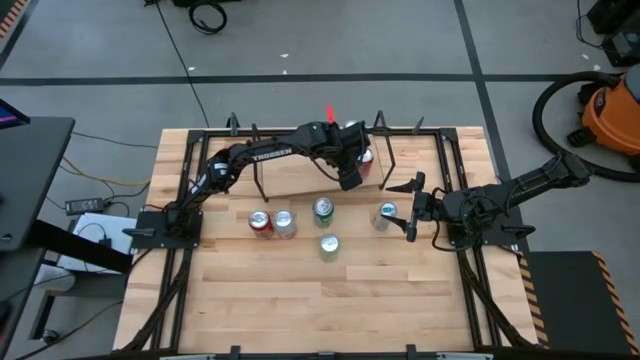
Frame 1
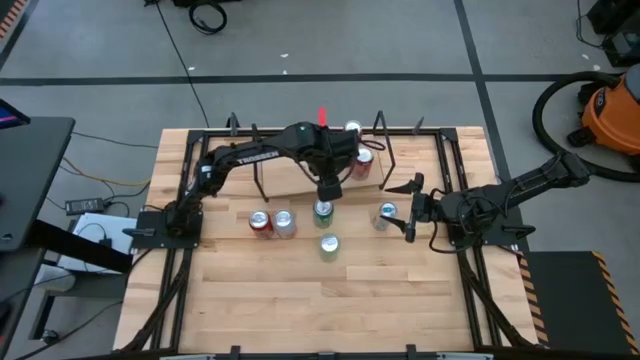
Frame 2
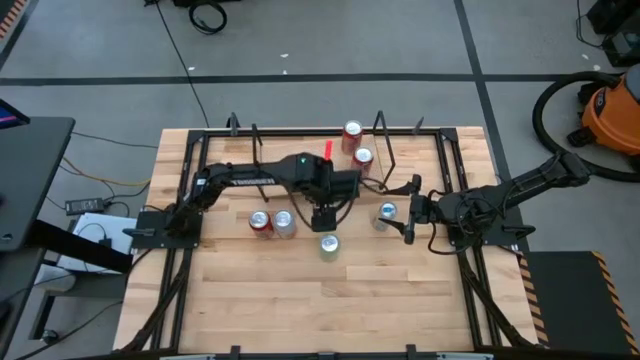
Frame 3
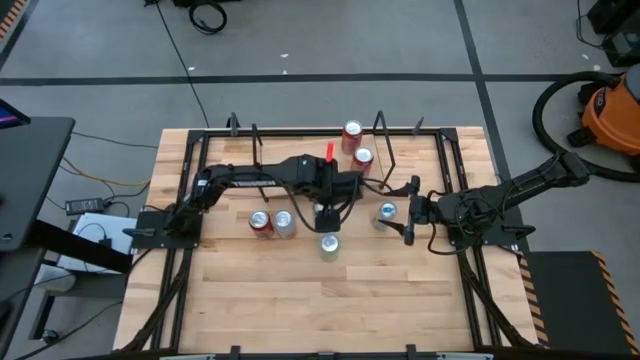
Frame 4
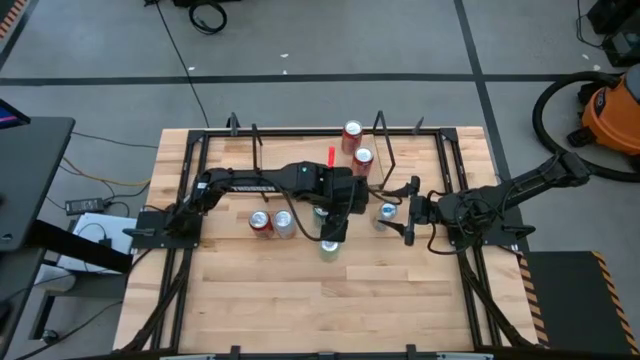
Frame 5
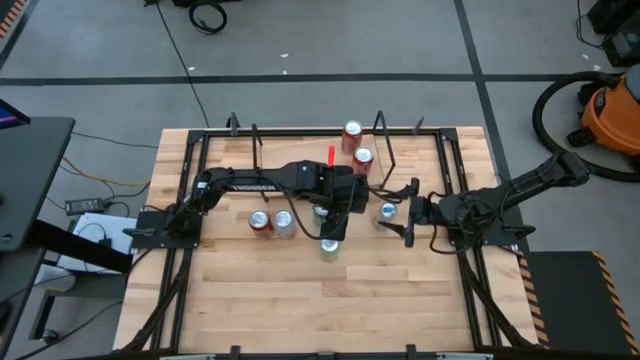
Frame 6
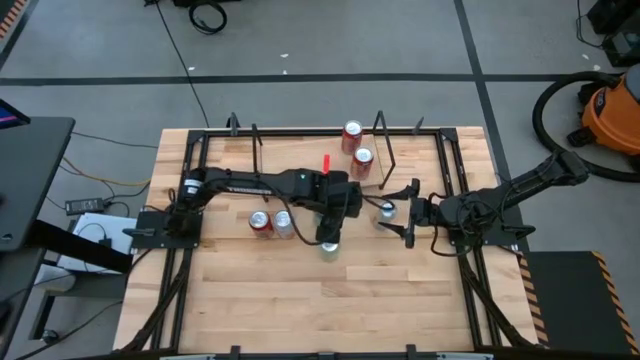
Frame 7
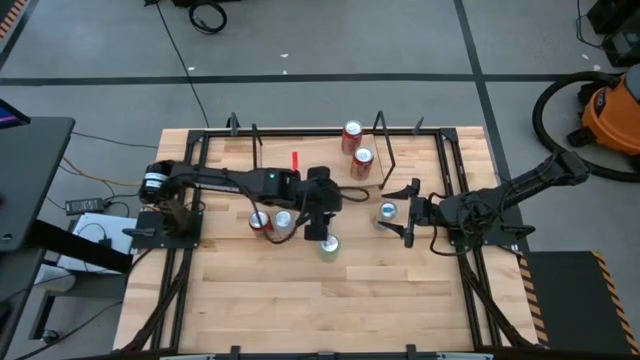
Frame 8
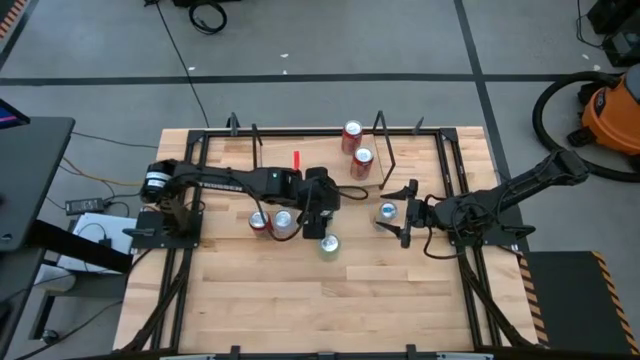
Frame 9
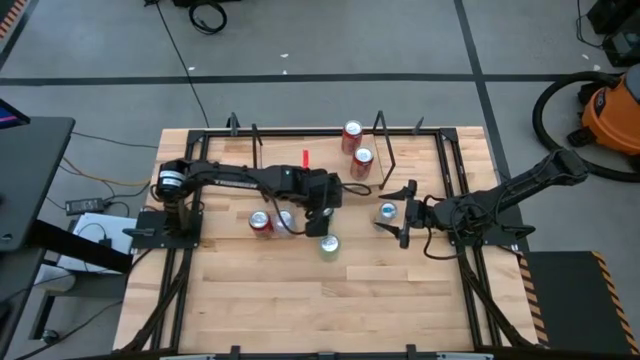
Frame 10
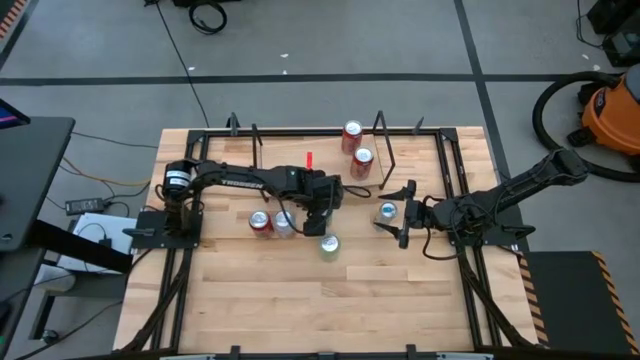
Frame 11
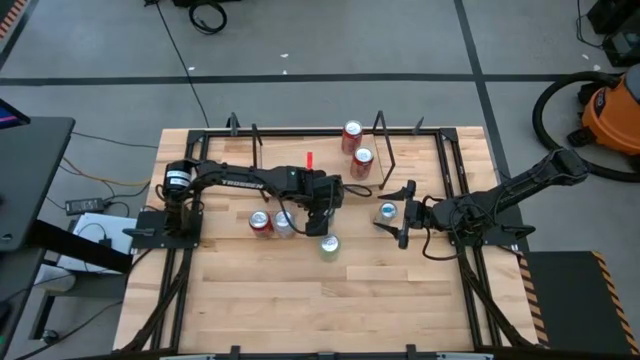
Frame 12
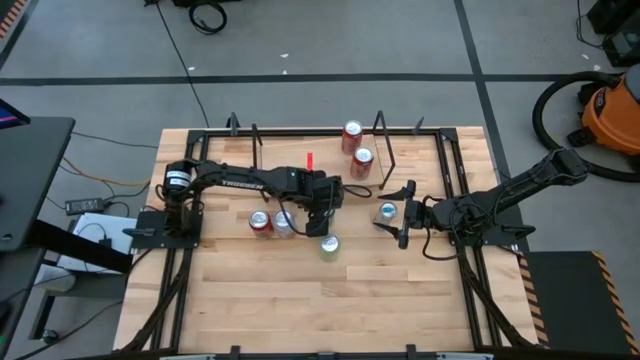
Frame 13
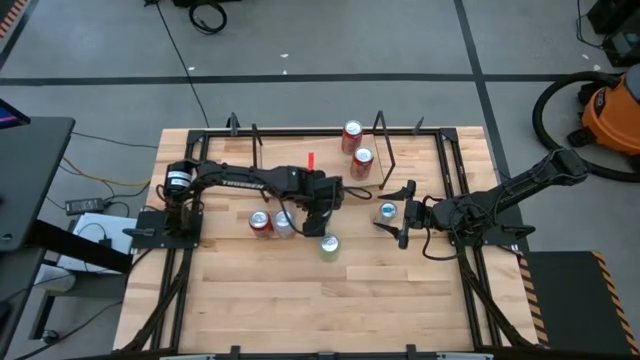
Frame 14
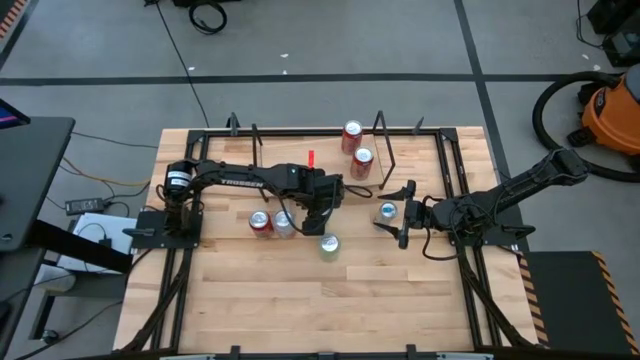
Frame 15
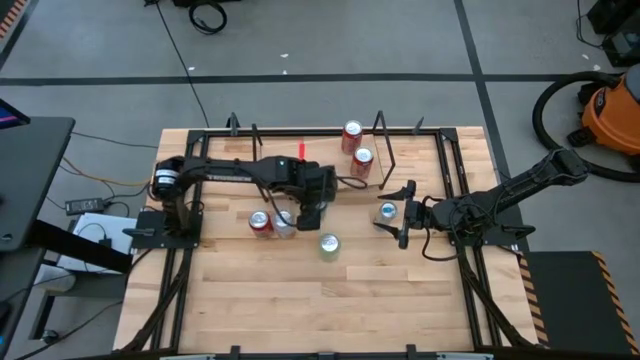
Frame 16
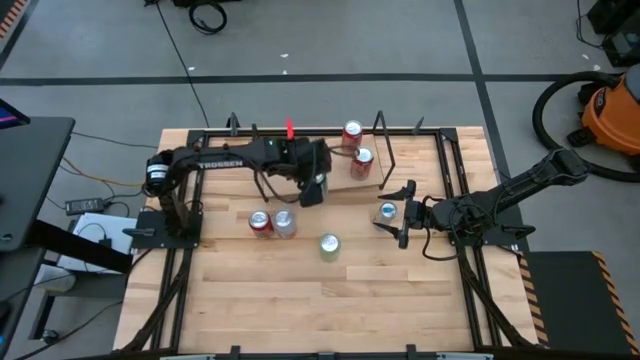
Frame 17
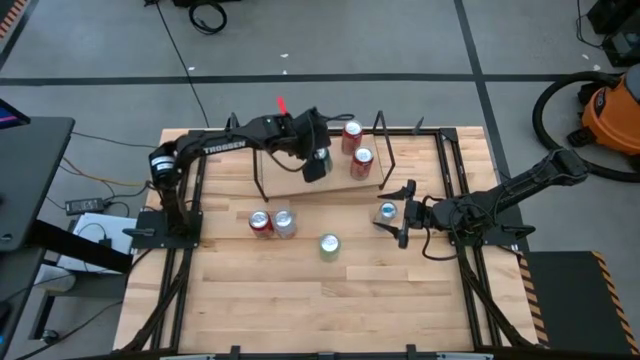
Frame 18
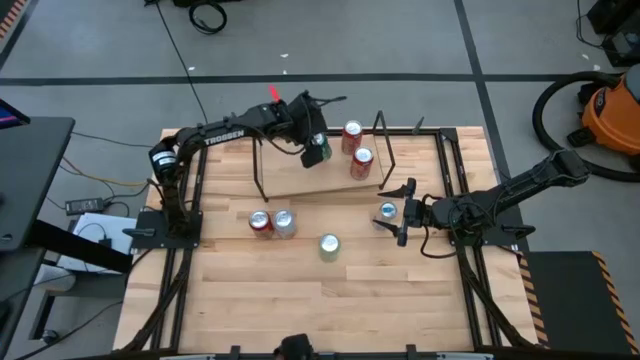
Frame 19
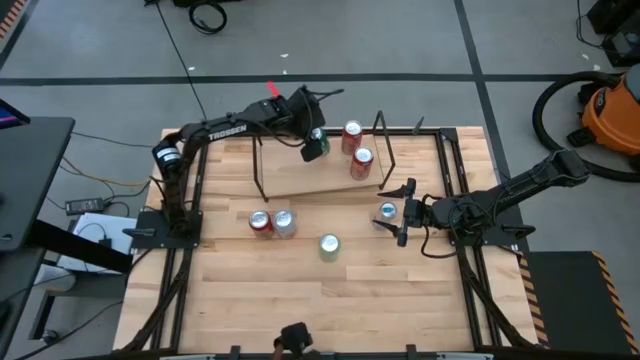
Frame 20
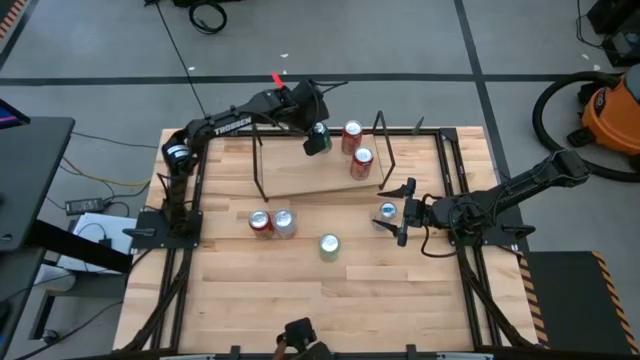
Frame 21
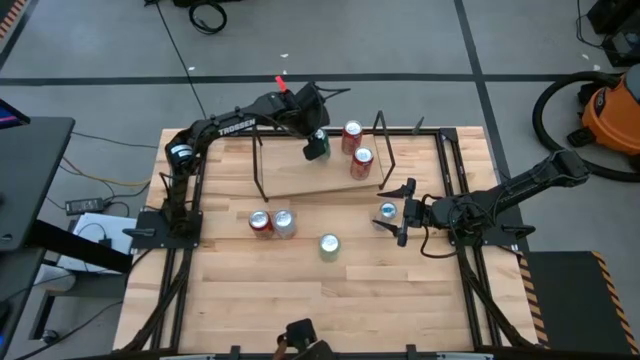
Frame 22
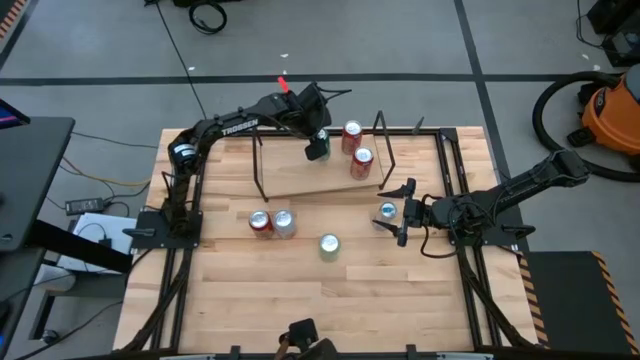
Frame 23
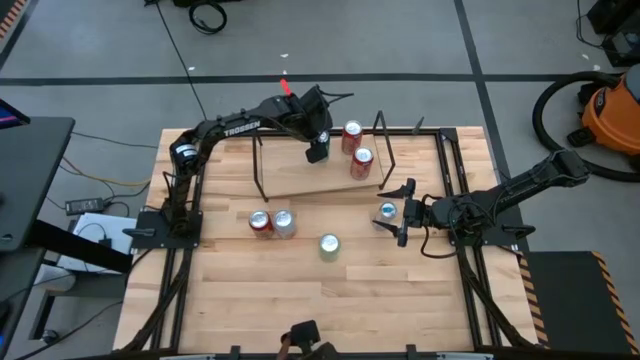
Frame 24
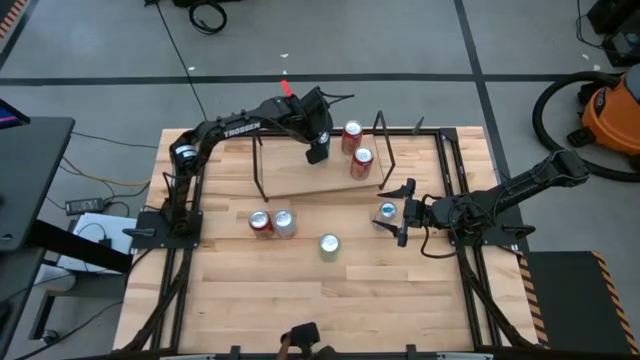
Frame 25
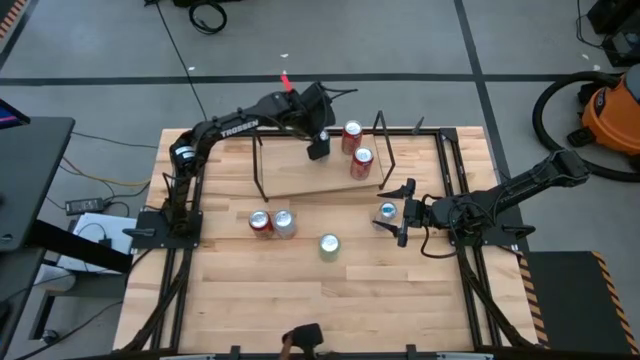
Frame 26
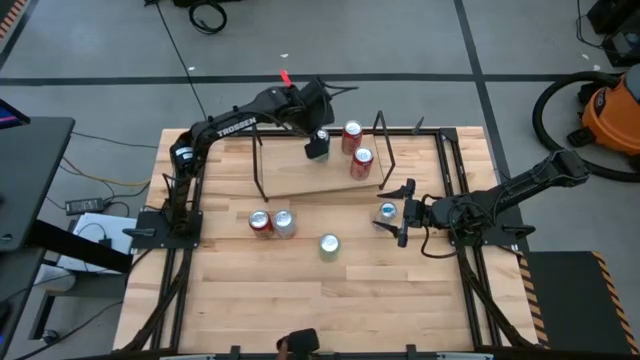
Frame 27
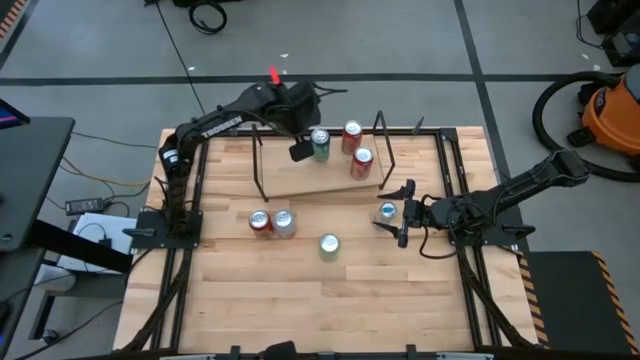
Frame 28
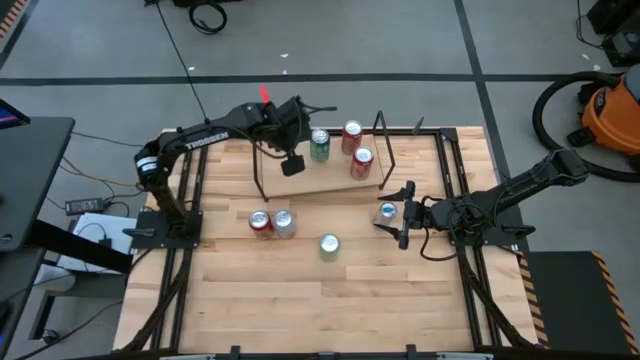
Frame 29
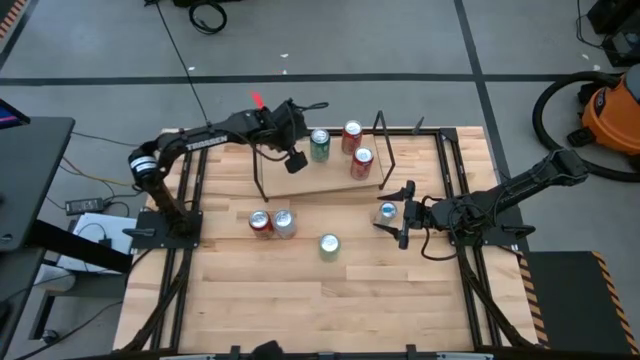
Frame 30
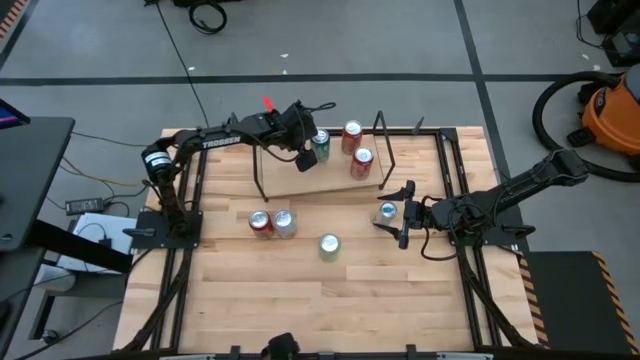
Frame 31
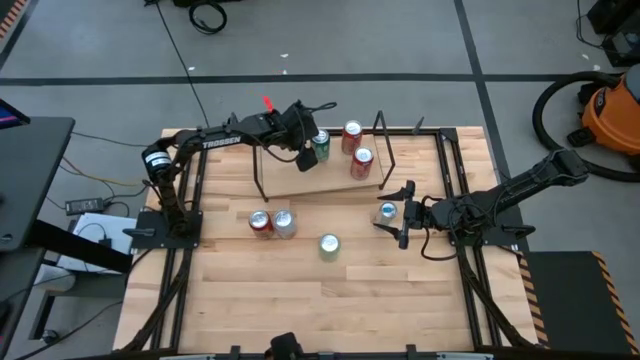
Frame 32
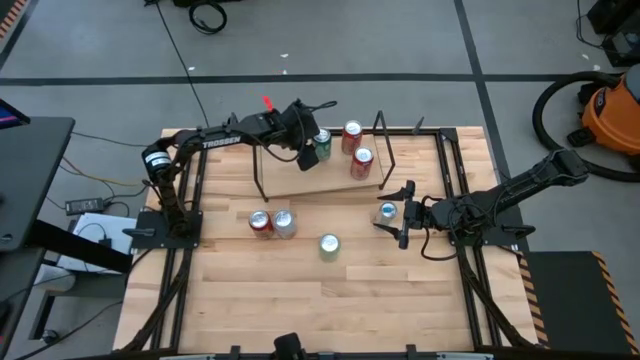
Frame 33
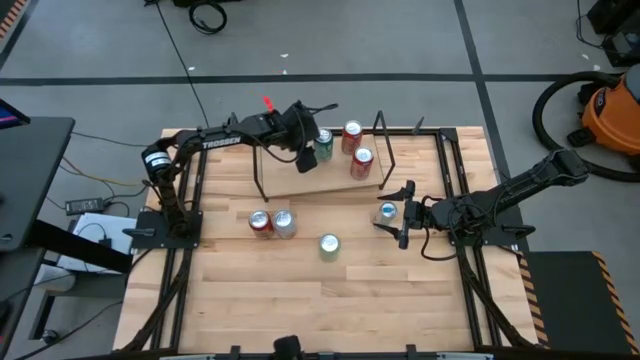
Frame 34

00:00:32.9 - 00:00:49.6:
Task: Place canned beverage on shelf
Put the green soda can on the shelf

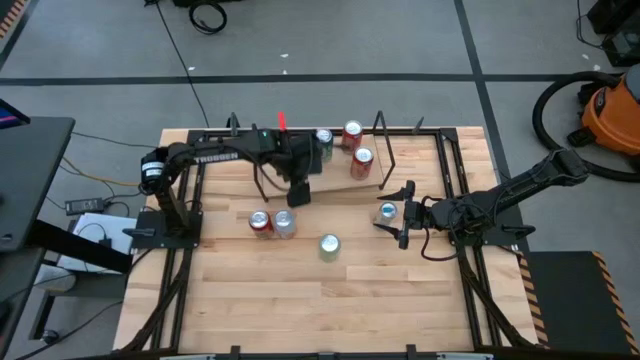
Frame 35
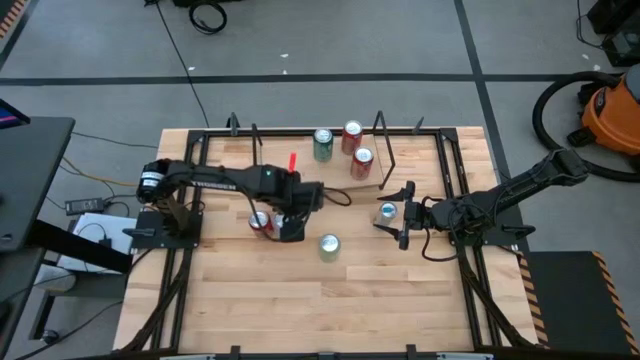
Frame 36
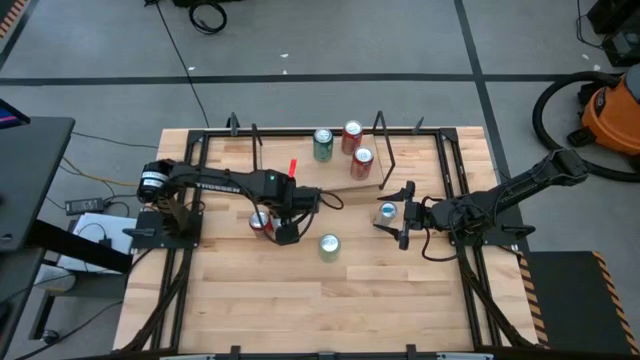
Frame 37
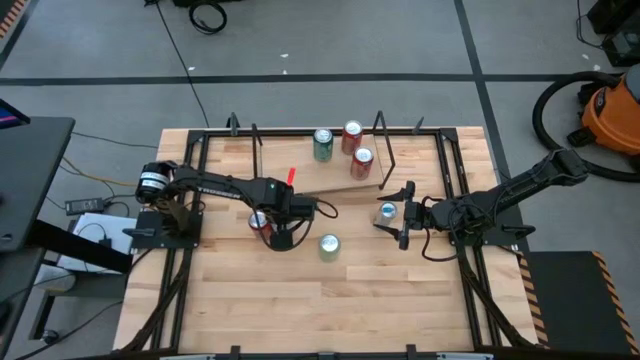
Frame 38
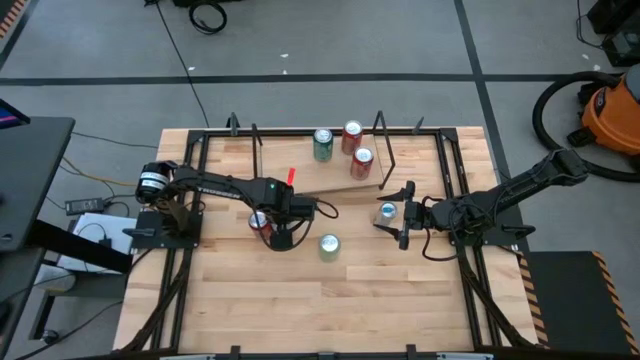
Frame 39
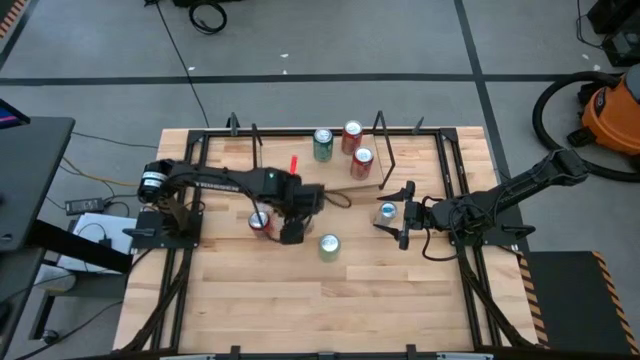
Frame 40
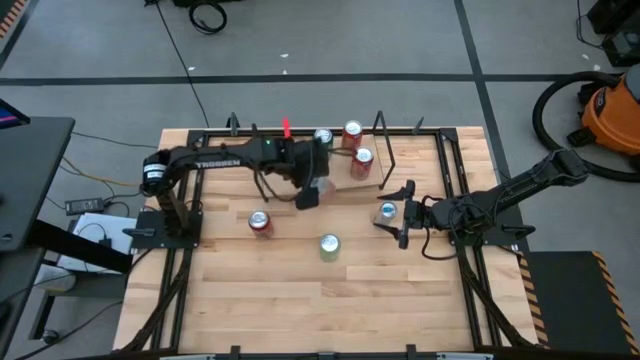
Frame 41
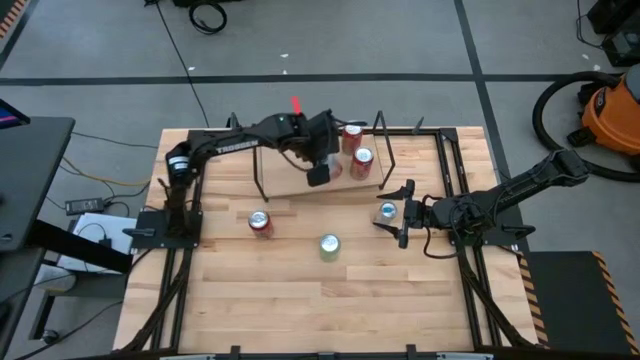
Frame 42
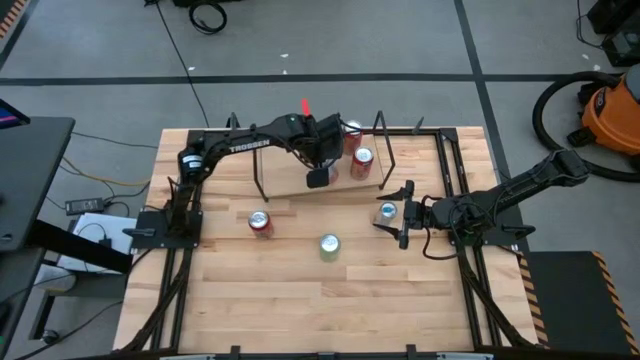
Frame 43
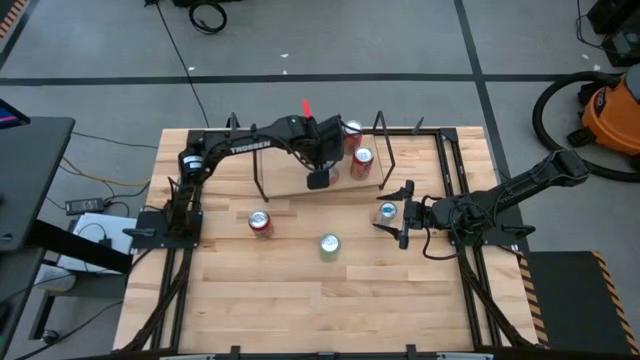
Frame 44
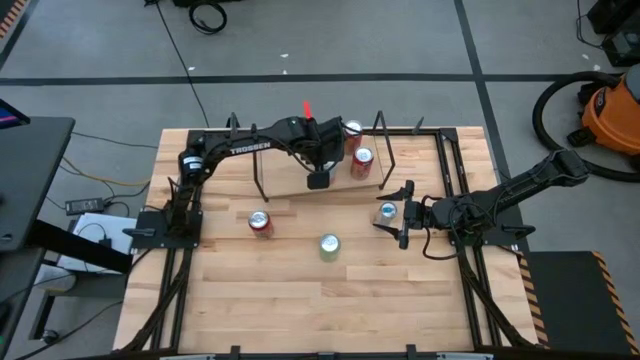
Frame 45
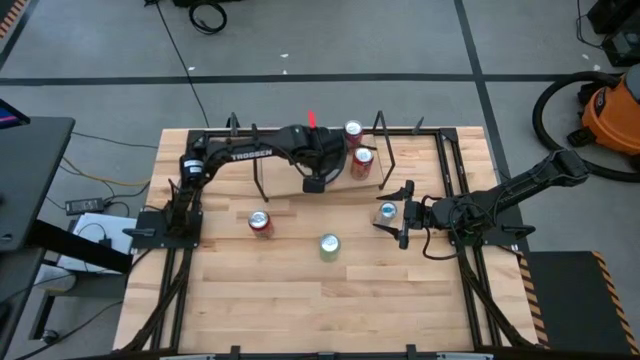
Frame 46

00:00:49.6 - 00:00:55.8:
Put the orange-white soda can on the shelf aligned with the green soda can
